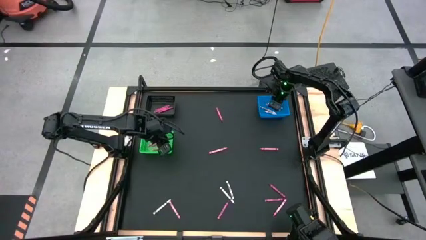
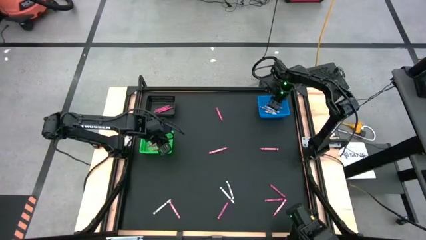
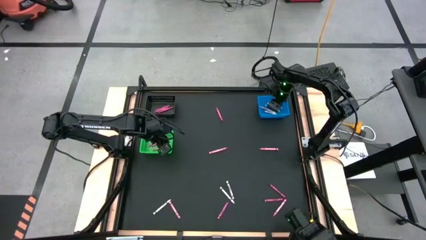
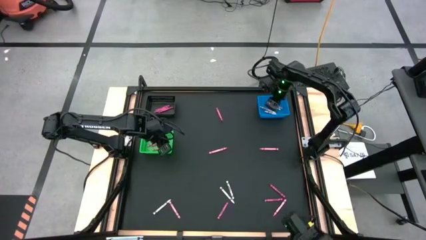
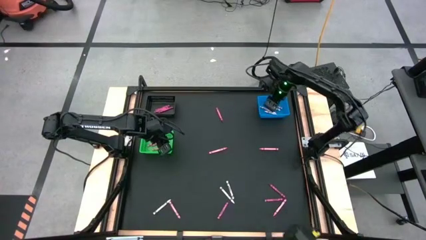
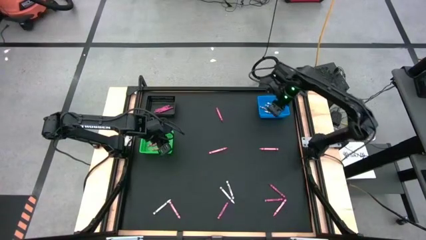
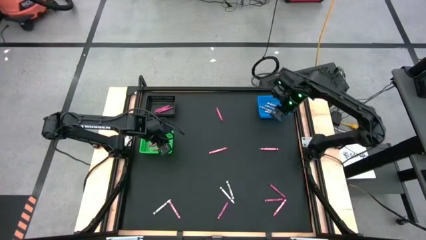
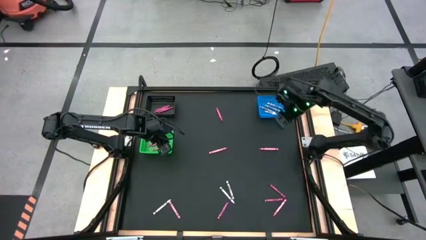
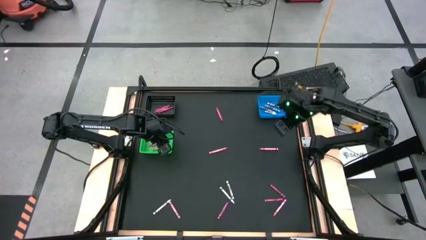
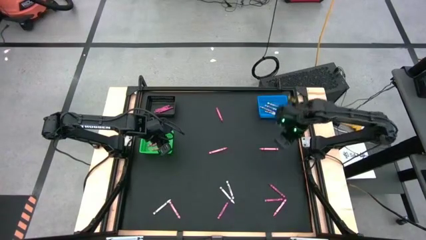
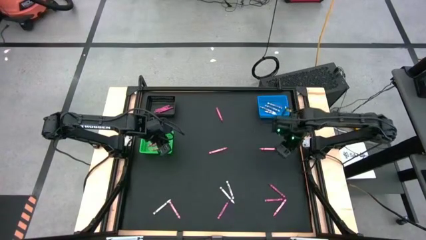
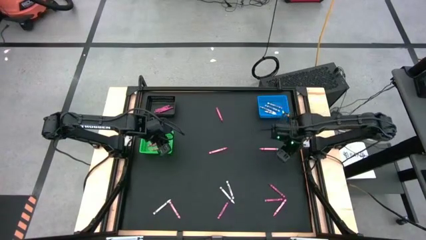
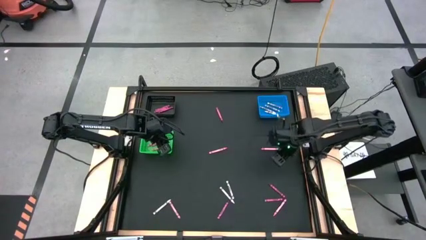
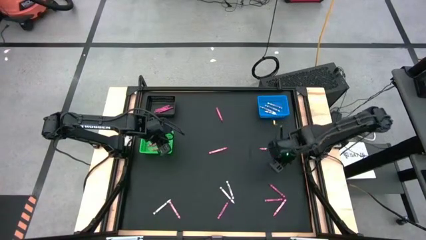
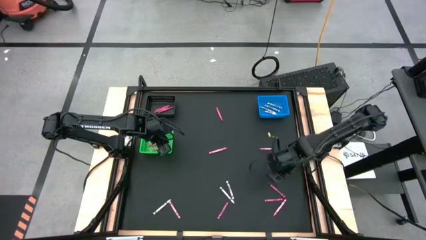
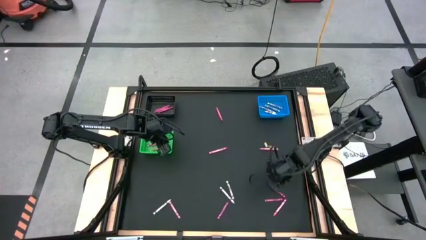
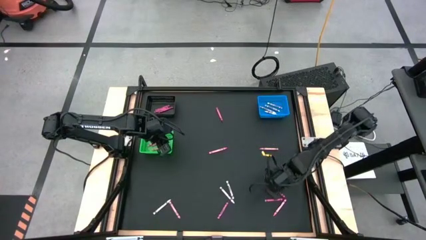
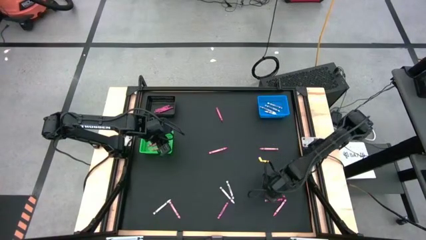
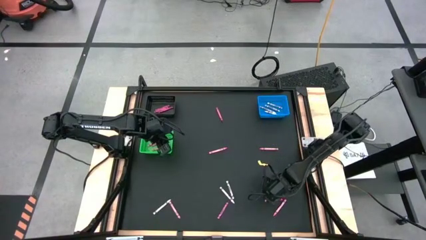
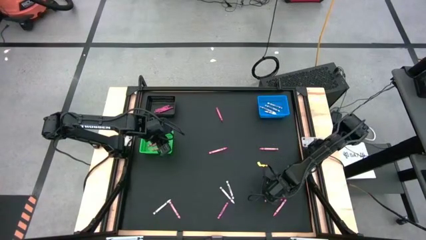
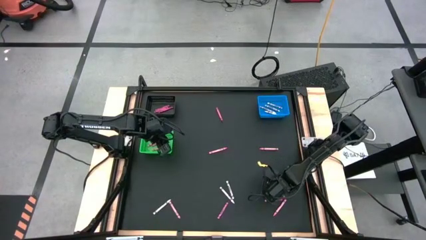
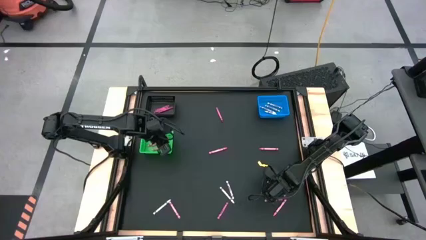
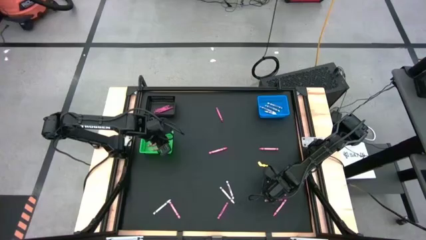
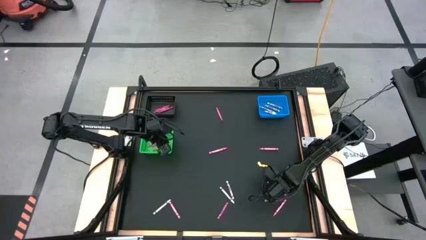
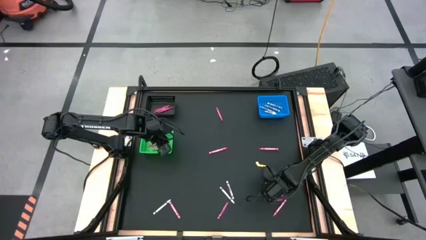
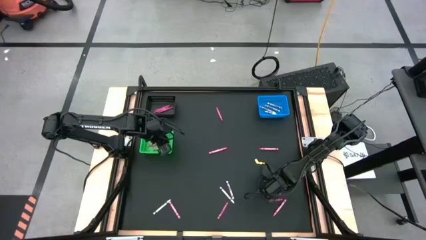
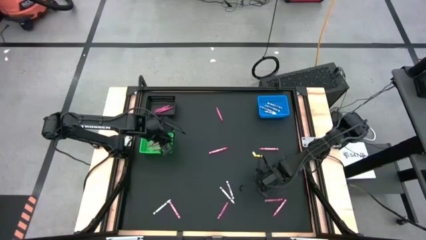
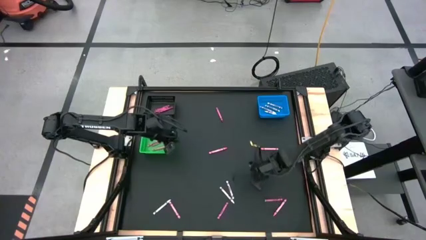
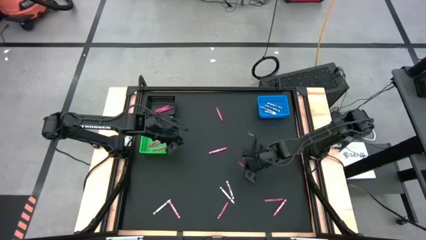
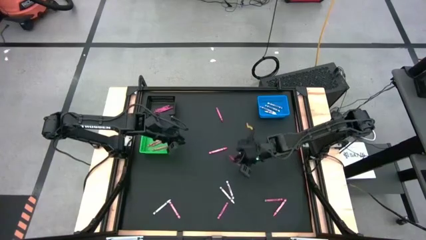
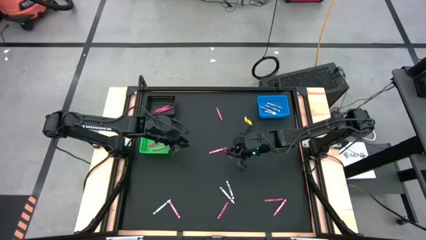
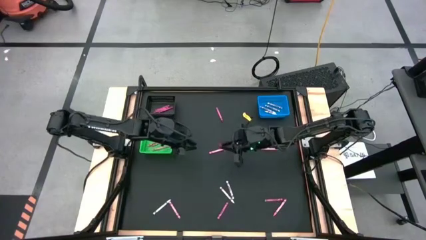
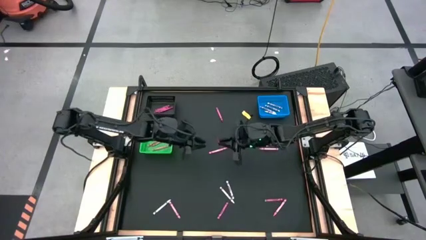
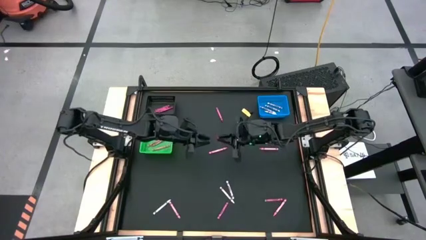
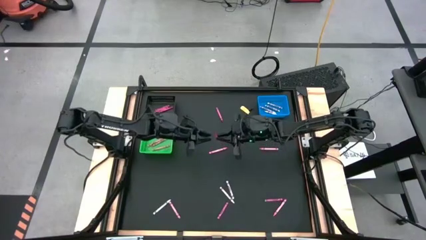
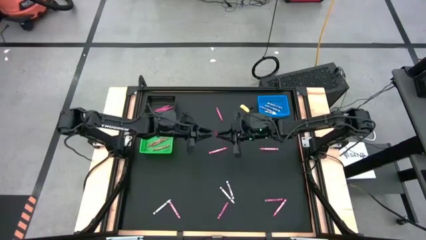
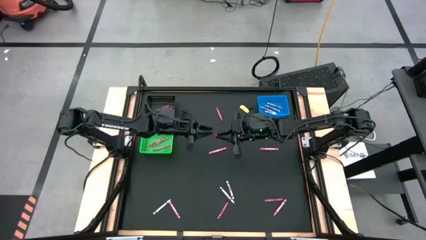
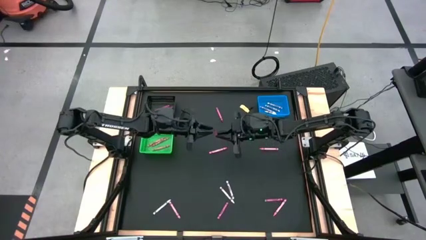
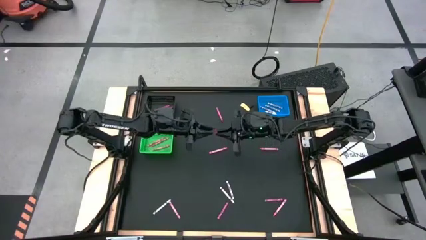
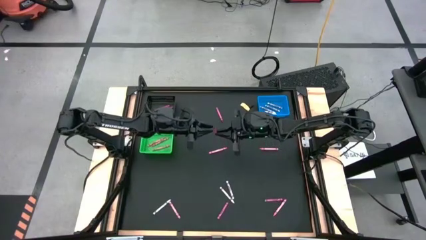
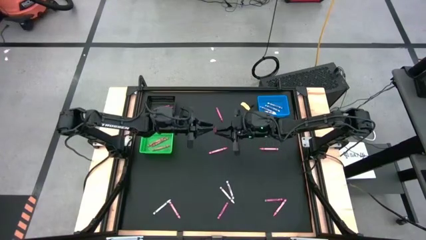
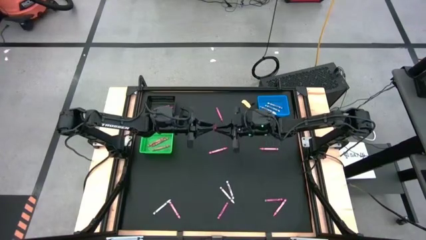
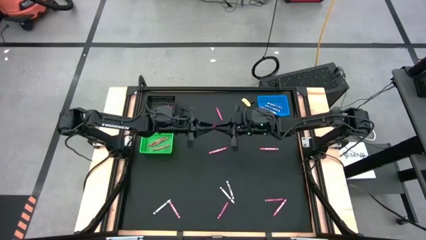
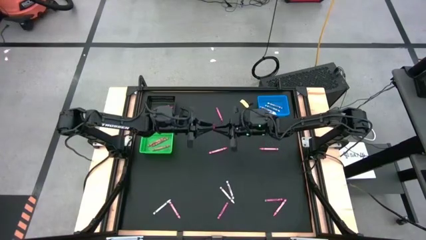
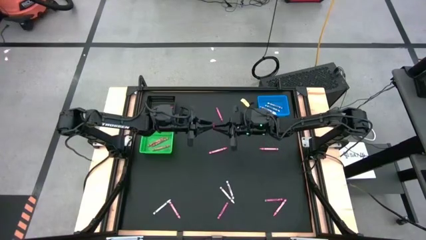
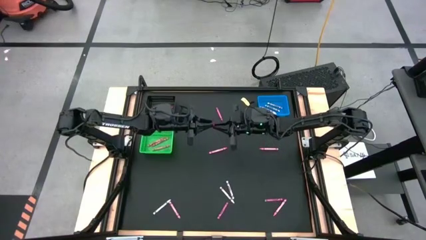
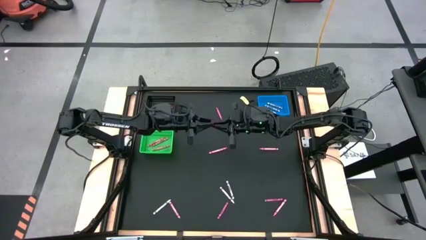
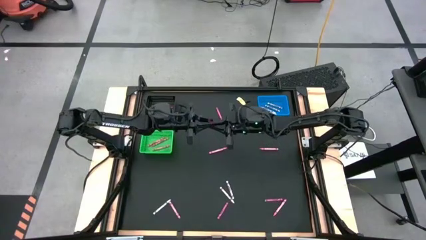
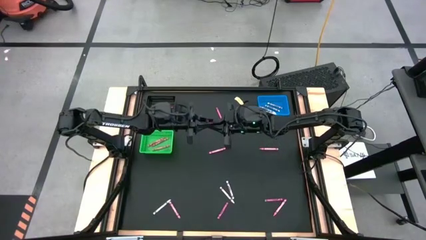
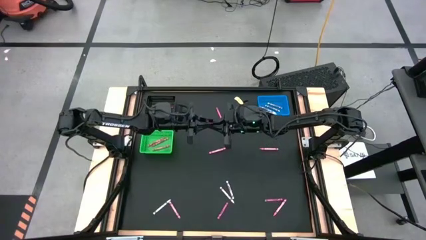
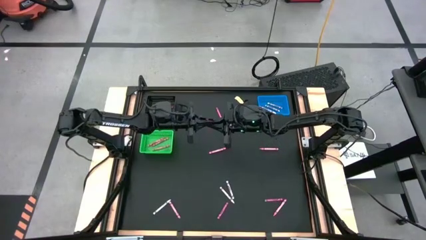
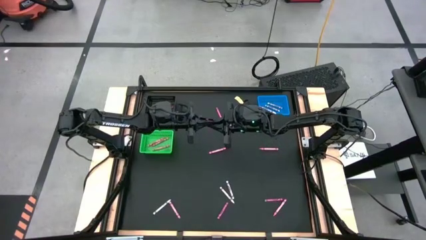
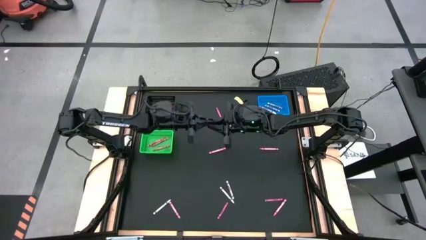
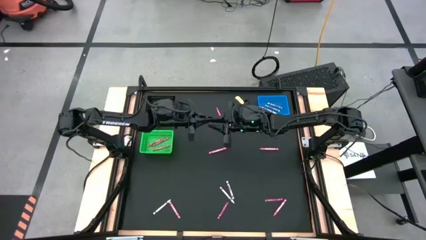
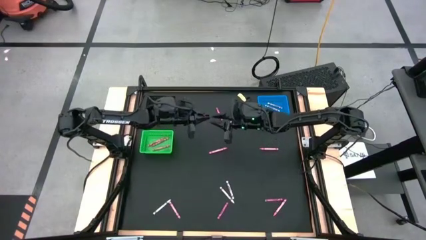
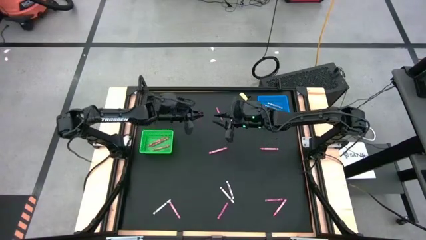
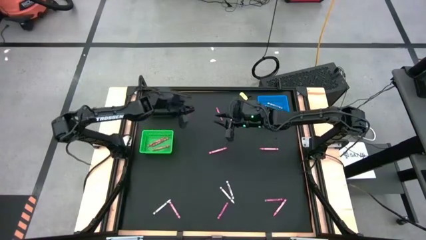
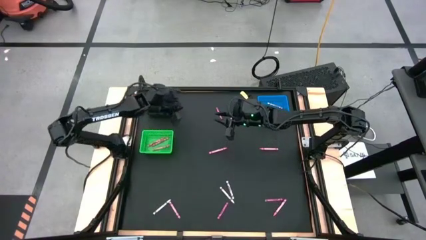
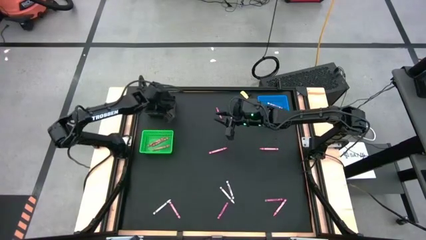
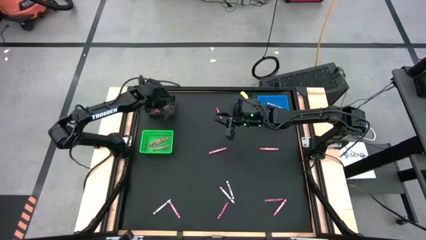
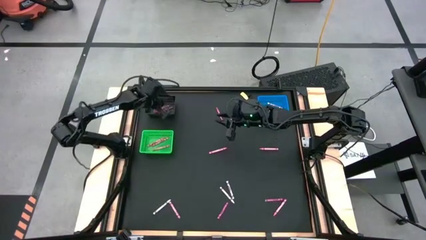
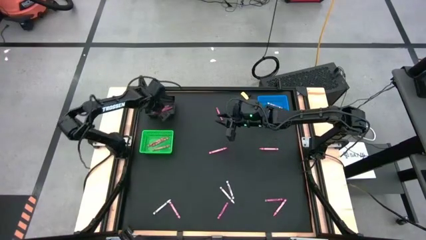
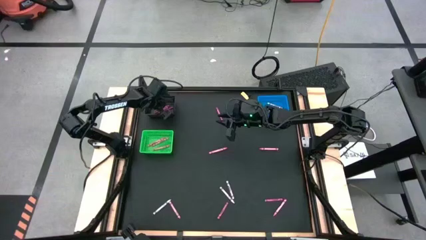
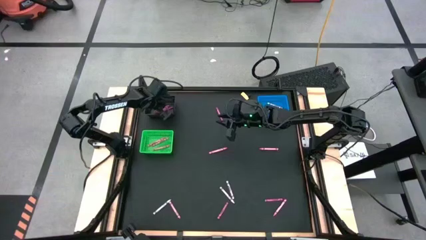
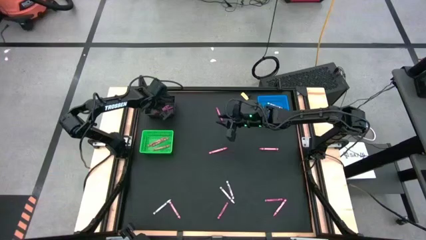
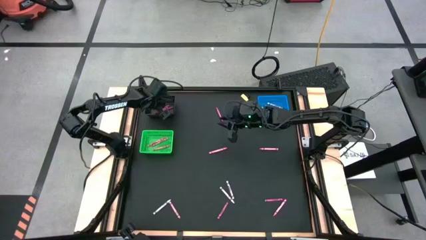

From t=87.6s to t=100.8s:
Task: Sort crayons
Put the red crayon into the black bin

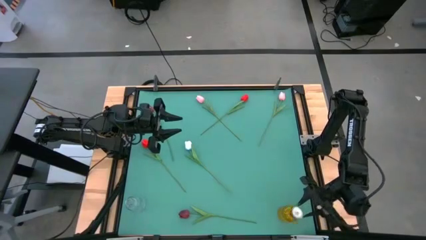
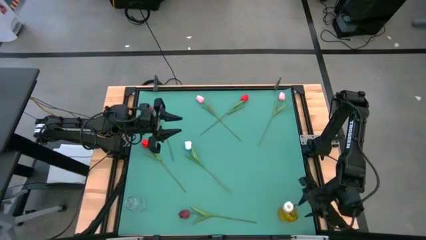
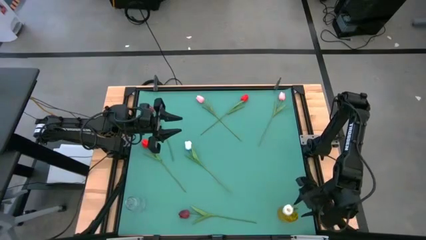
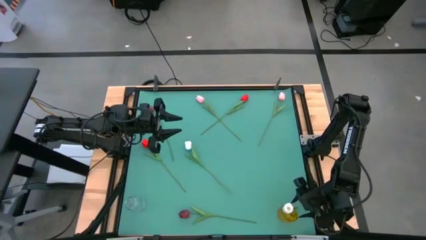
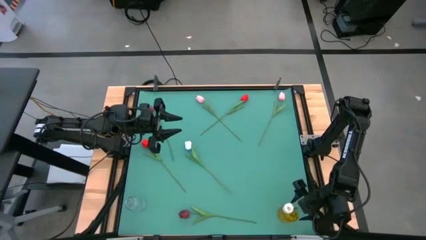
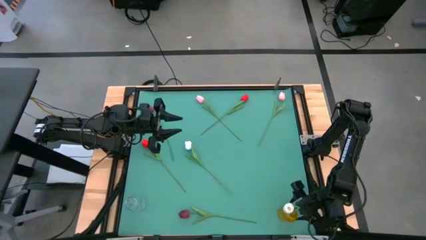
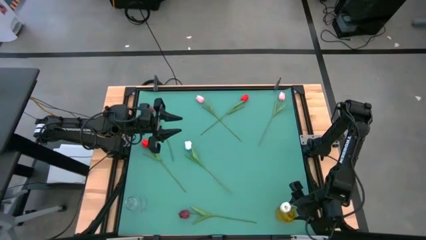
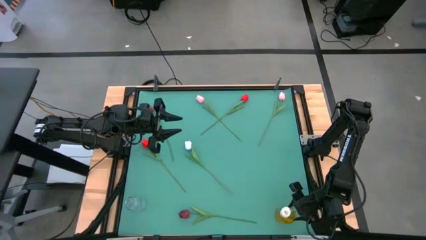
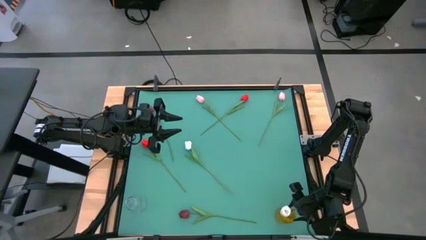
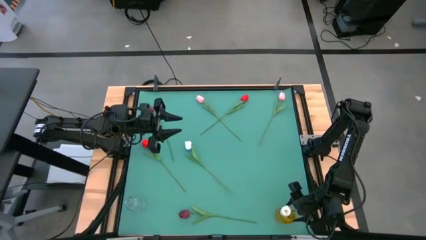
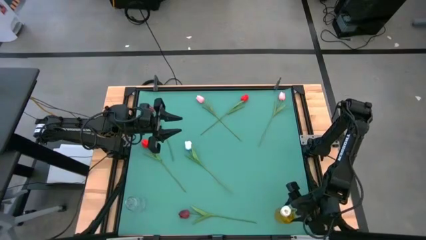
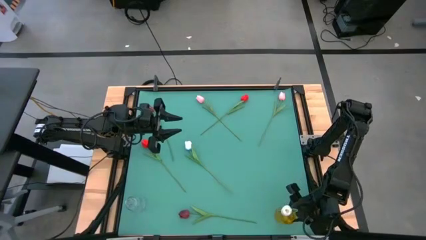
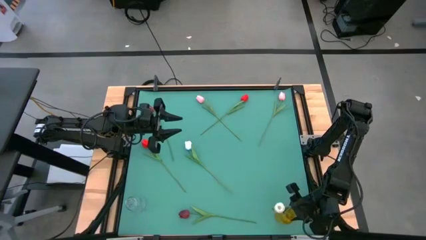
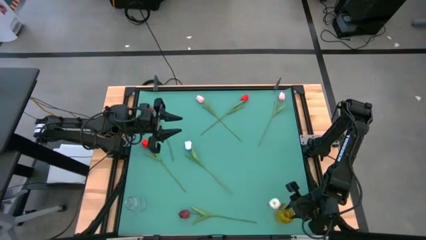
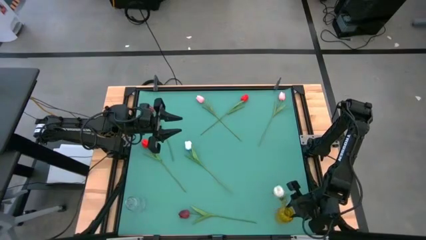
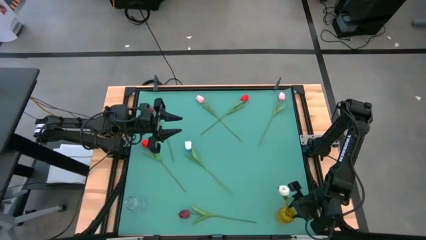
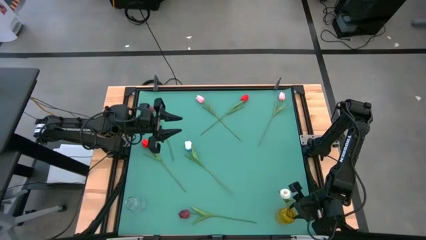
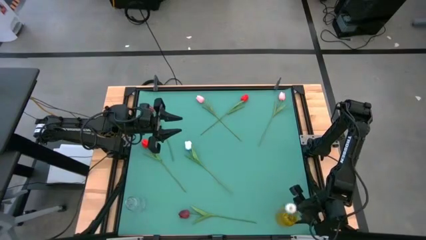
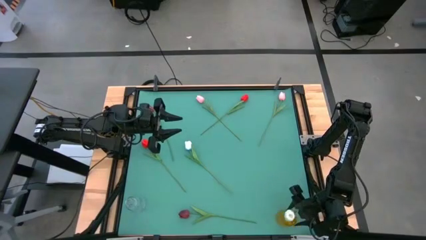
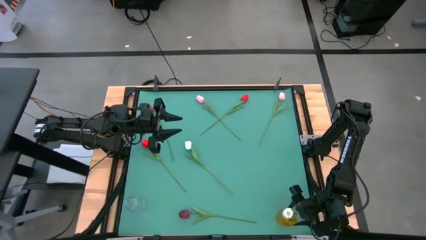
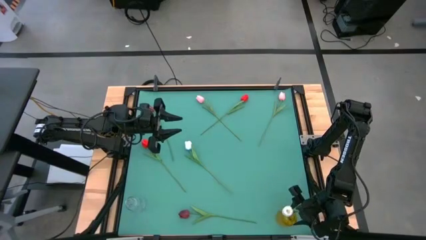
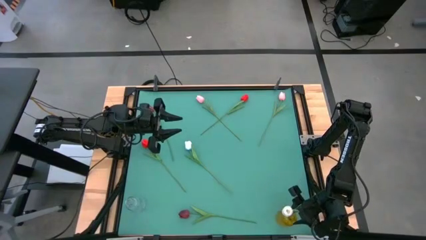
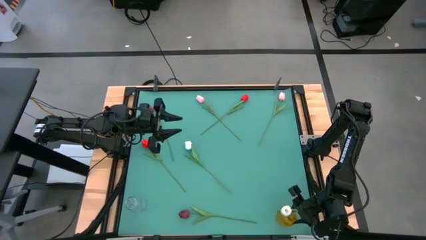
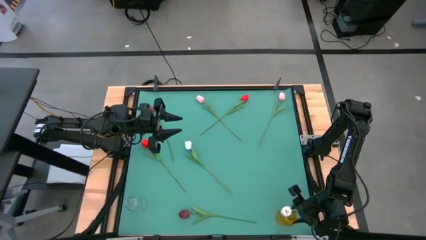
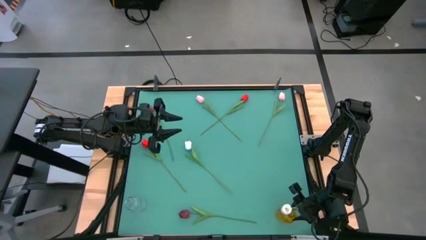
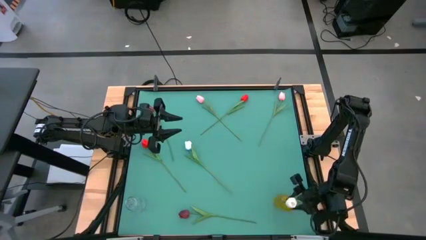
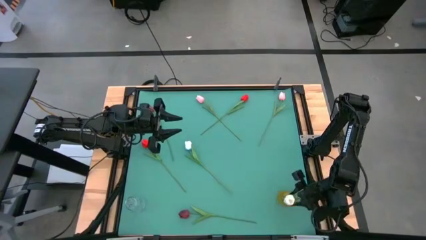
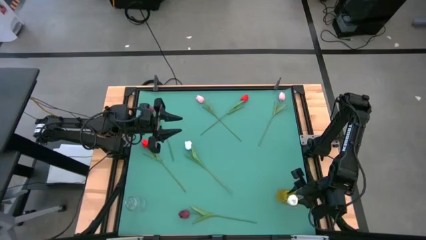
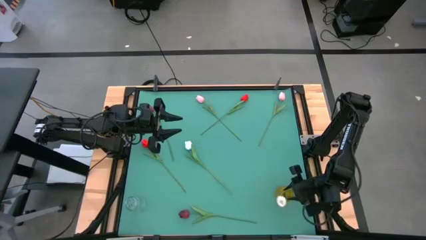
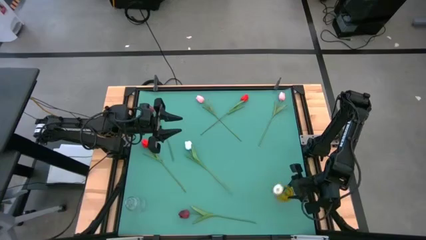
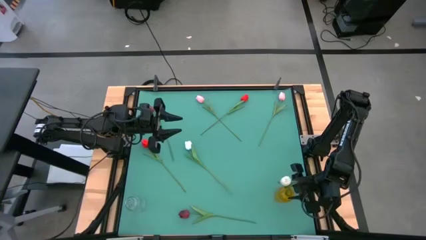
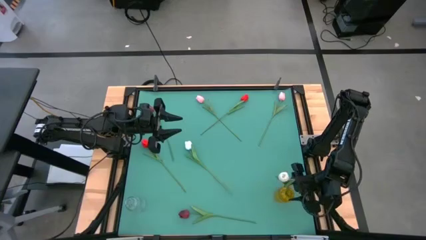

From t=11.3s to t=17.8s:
Task: Sort flowers into vase by color
Adjust the yellow flower vase
